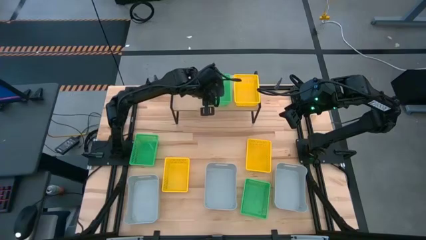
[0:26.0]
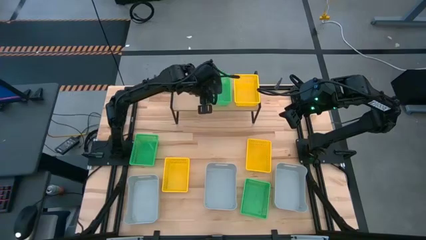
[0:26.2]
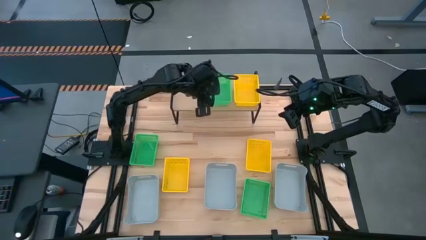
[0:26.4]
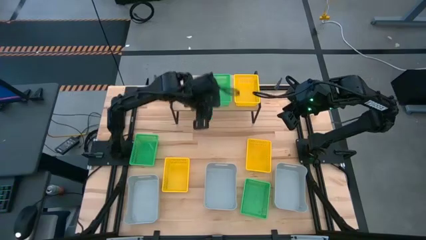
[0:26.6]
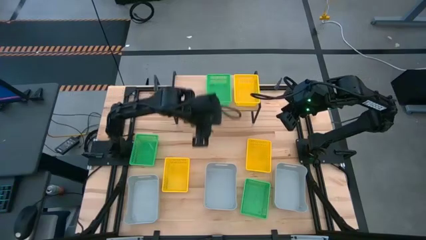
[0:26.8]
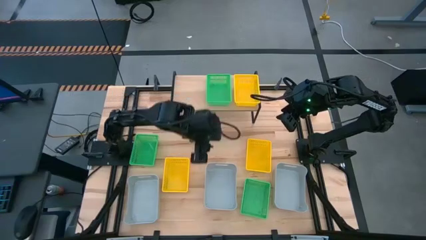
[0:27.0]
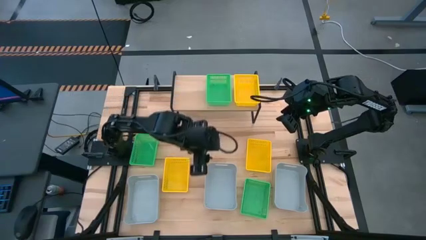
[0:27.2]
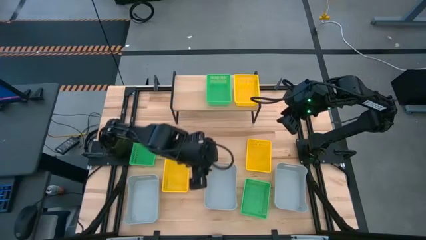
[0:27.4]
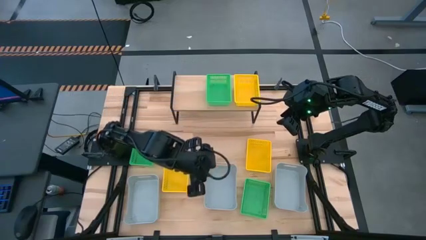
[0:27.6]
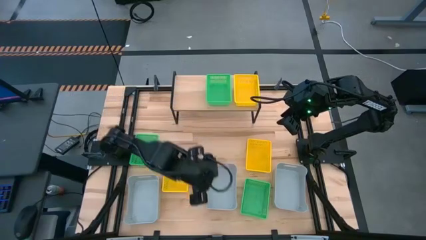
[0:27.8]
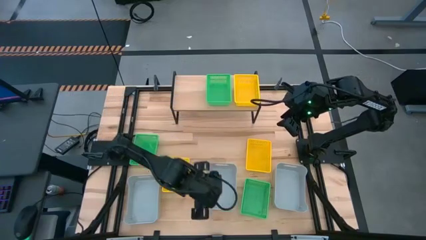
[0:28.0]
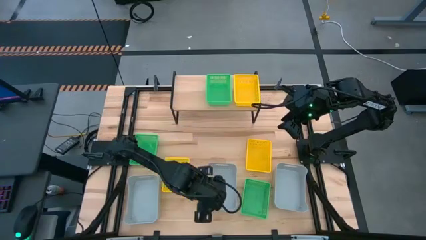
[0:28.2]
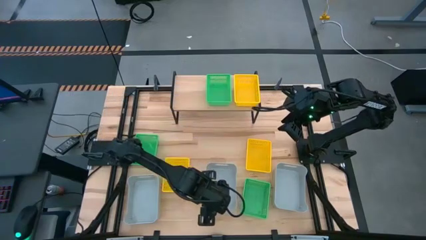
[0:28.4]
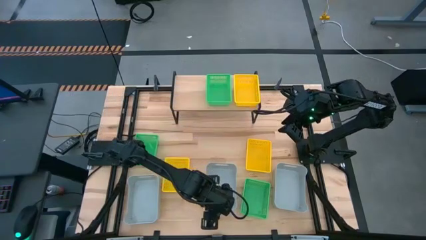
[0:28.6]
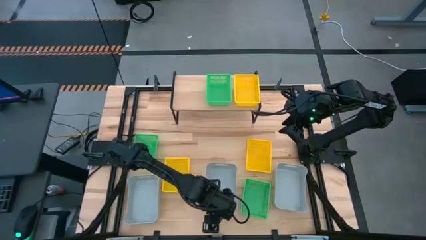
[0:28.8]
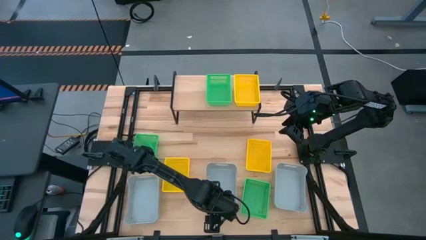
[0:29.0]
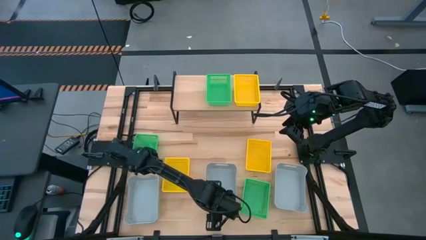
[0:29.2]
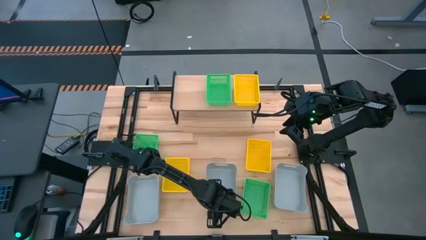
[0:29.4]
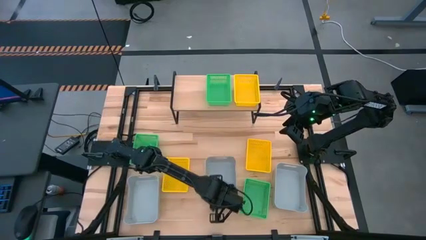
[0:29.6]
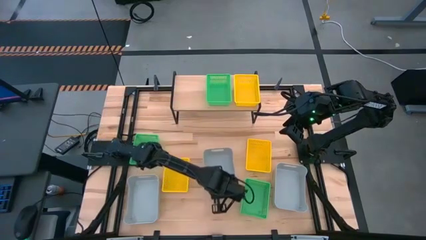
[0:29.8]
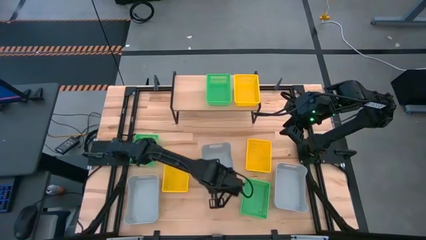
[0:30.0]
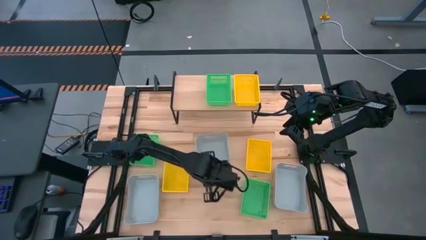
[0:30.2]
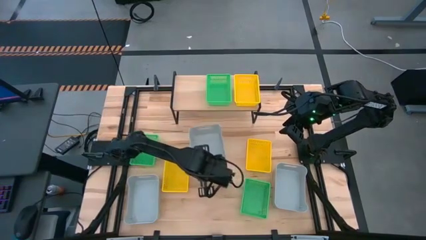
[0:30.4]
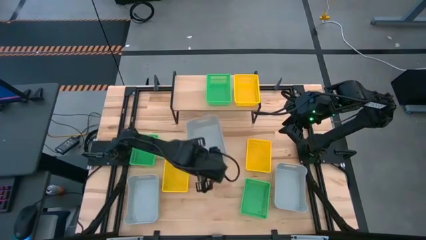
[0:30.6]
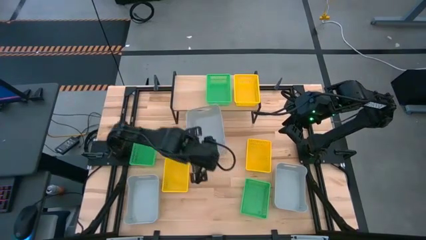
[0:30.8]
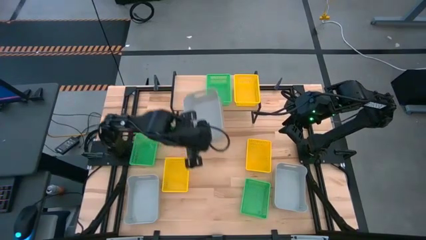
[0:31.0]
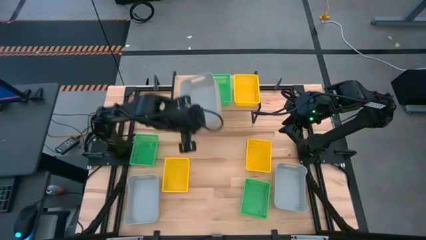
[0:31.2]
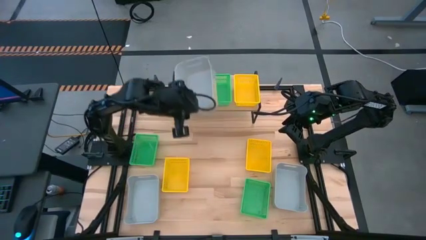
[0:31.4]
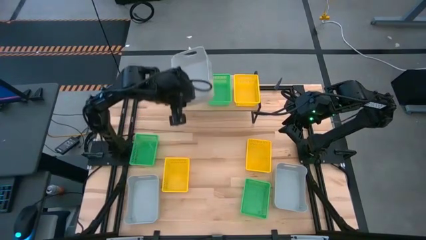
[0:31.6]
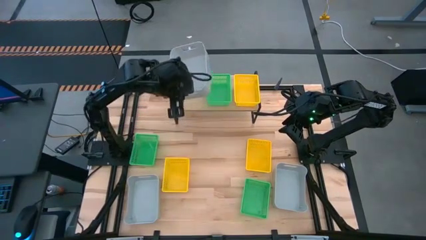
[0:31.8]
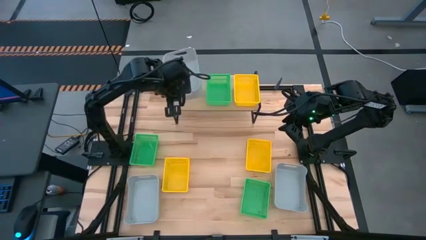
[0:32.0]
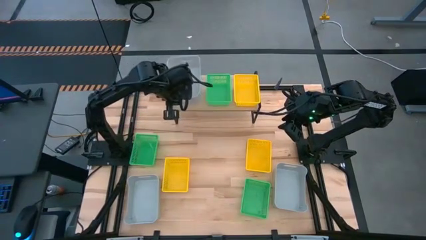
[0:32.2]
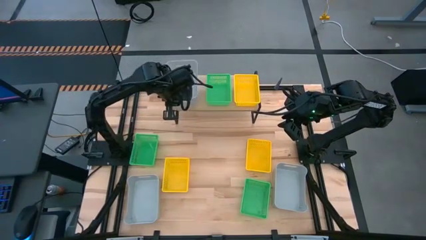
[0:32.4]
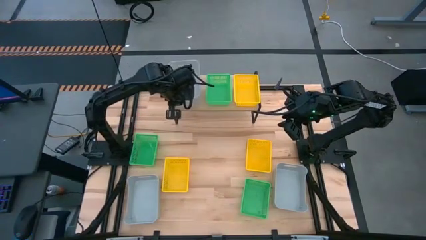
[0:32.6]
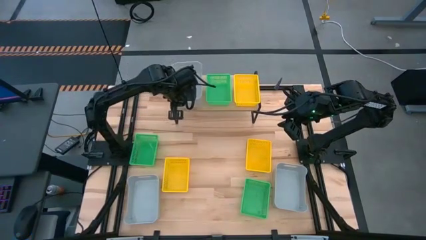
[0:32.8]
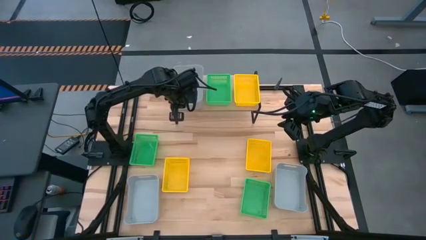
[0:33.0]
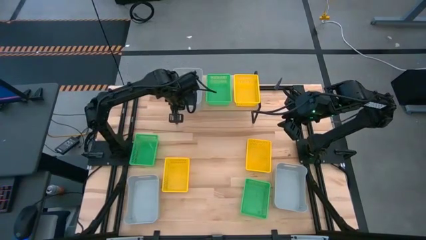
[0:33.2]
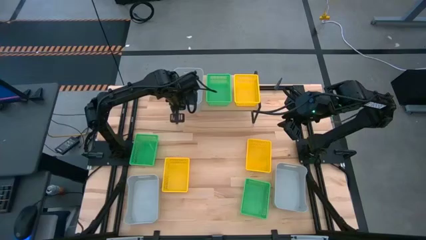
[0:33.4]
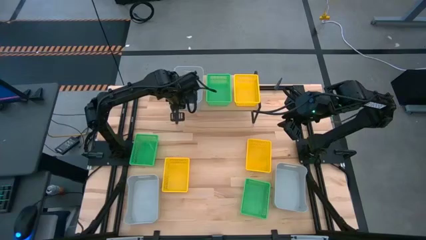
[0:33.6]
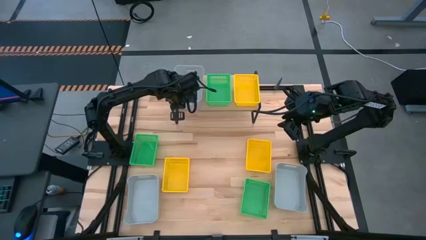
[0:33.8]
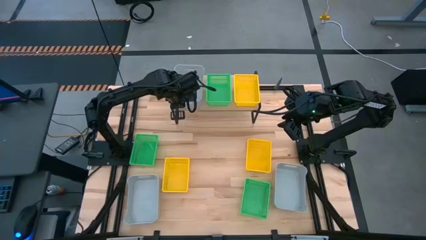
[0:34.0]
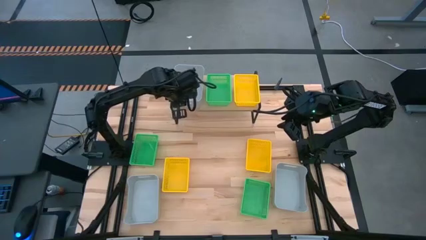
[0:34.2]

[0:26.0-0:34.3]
Task: Stack baskets on shelf by color
Put the middle gray bin on the shelf

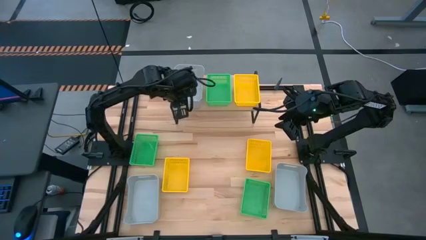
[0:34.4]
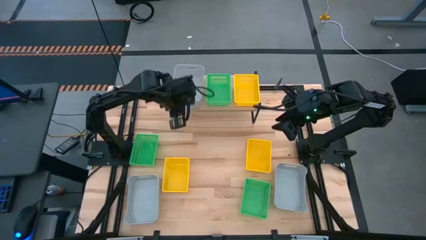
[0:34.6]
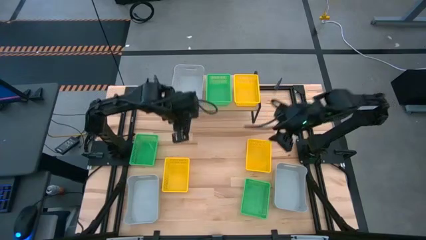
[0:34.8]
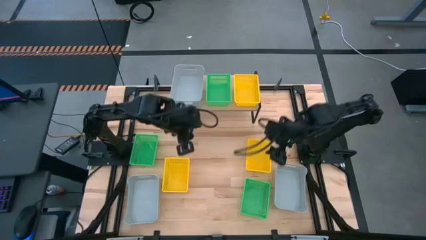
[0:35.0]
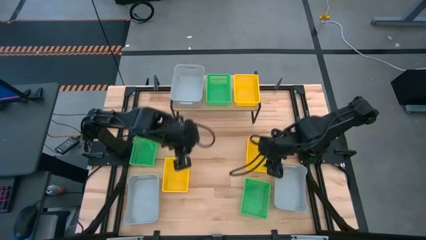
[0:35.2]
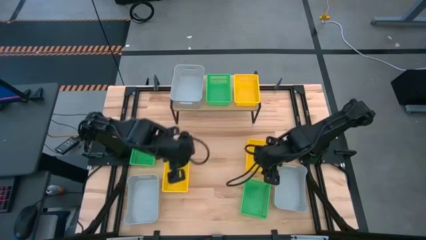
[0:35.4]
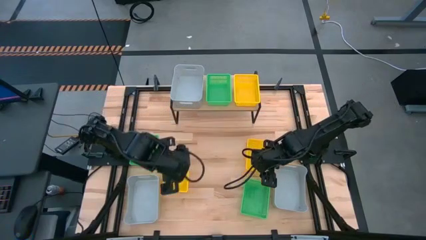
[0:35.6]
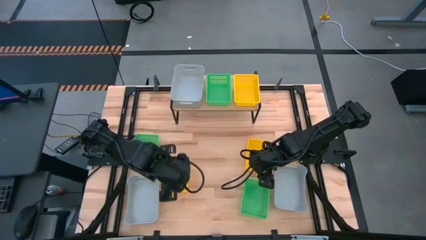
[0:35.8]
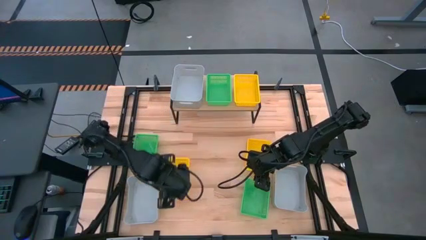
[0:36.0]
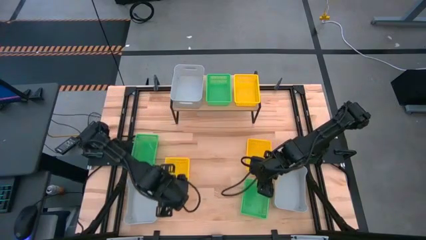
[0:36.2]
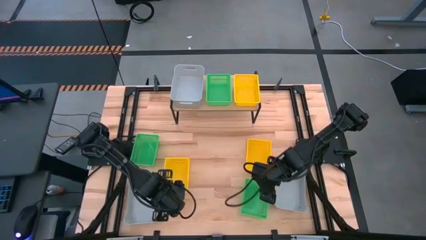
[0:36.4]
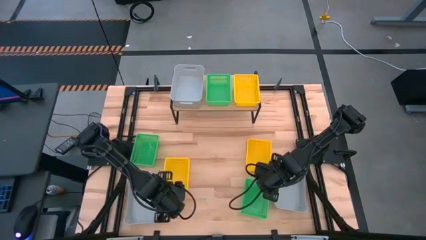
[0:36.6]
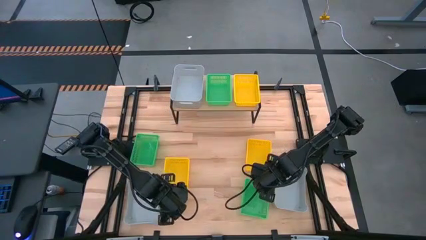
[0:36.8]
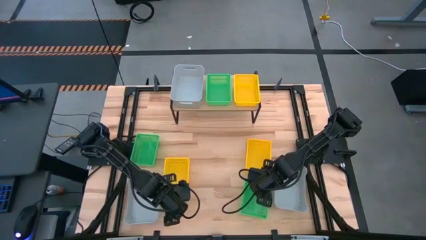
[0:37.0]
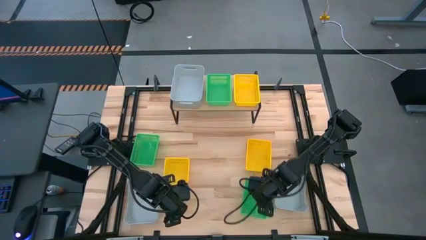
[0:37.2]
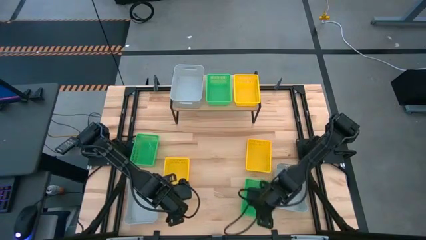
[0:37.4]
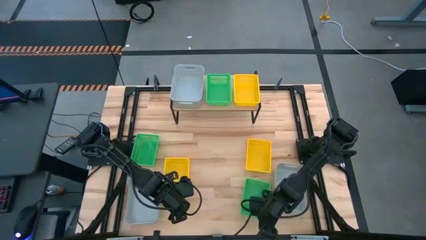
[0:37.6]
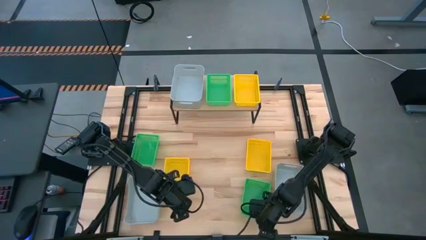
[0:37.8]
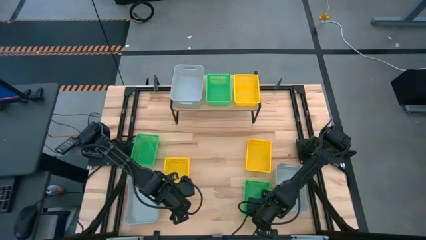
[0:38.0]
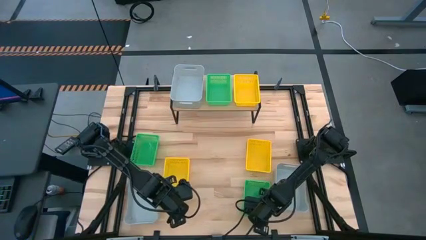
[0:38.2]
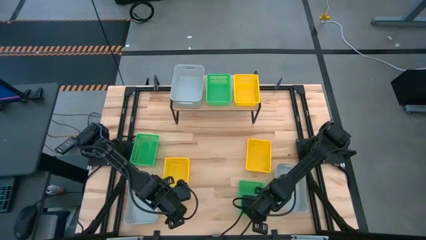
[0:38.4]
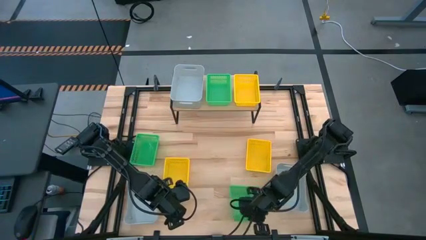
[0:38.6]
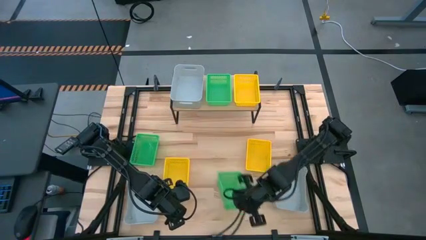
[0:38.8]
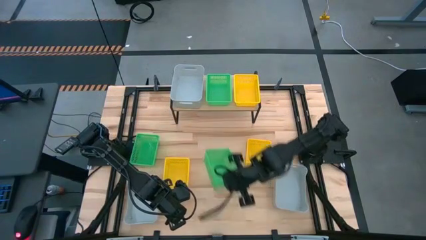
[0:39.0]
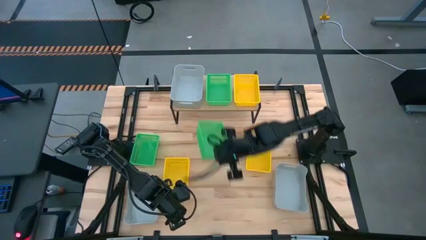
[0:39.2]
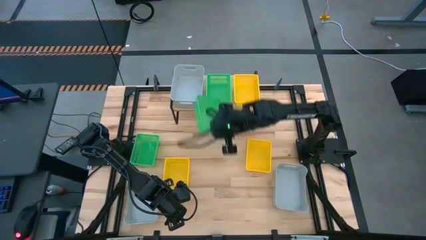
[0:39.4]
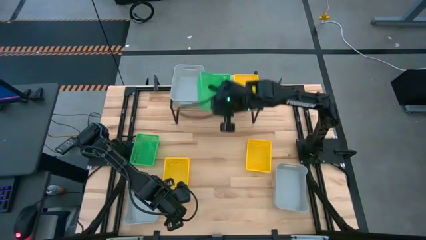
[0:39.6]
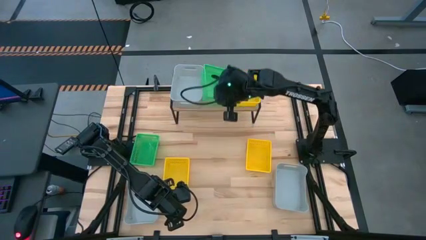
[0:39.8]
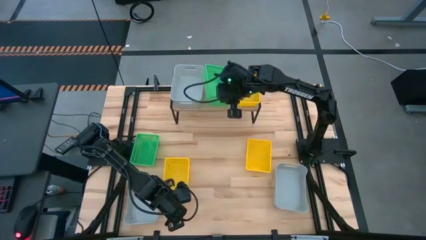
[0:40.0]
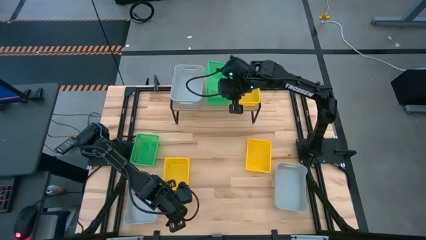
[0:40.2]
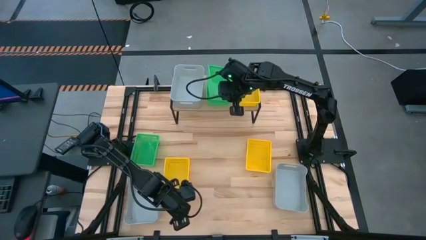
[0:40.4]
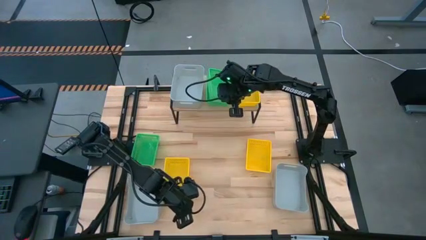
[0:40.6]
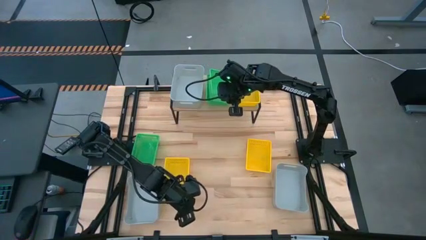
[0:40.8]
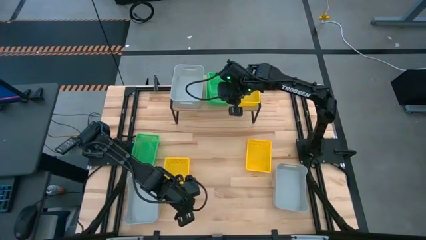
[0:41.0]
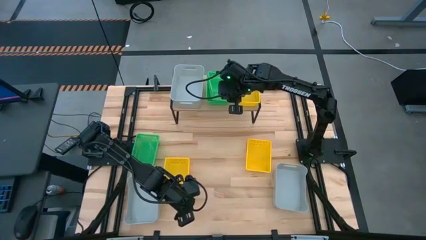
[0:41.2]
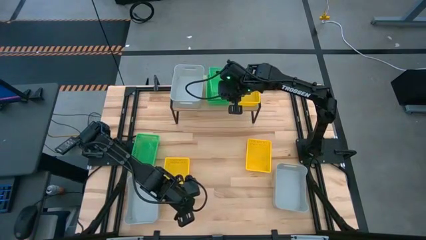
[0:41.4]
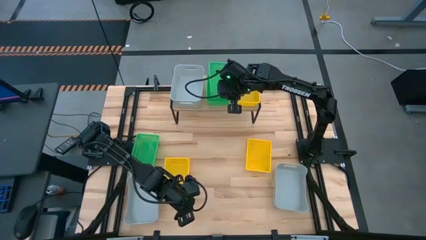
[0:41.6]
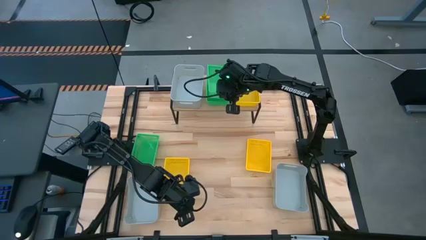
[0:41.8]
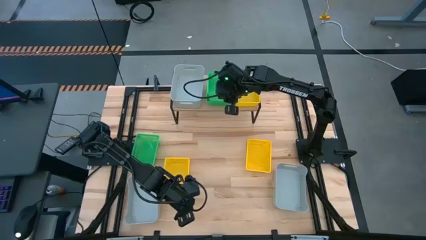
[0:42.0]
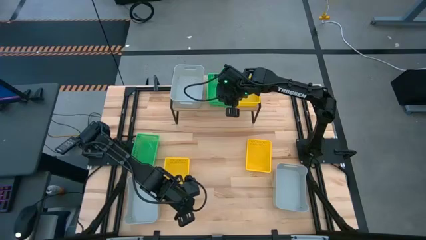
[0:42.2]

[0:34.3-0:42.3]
Stack the right green bin on top of the green bin on the shelf
